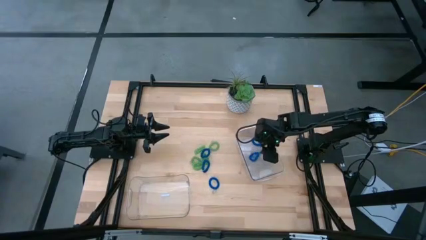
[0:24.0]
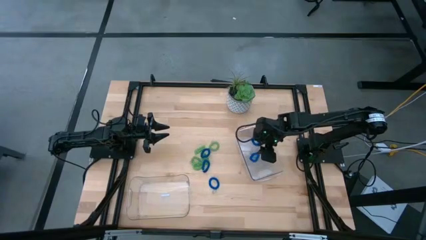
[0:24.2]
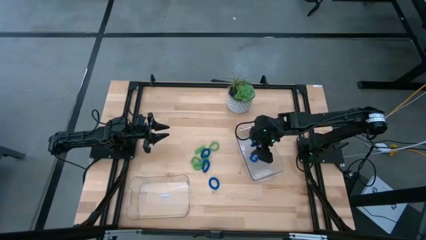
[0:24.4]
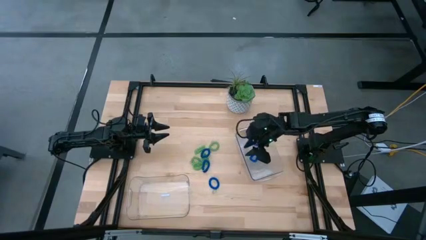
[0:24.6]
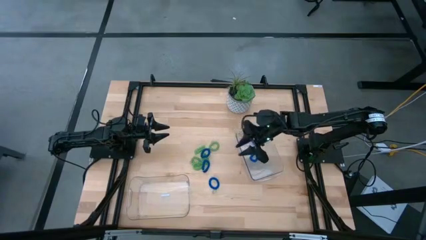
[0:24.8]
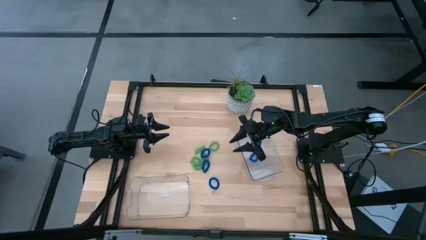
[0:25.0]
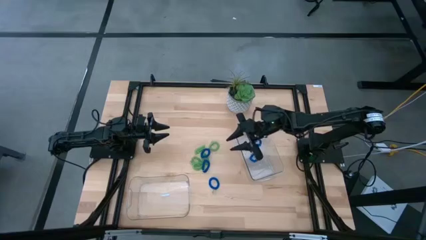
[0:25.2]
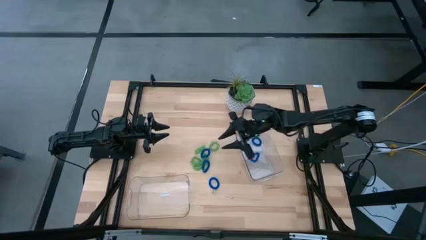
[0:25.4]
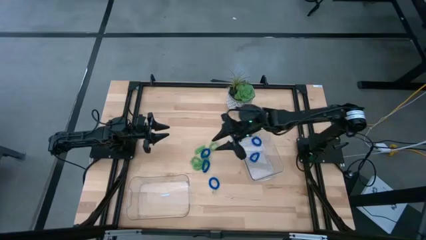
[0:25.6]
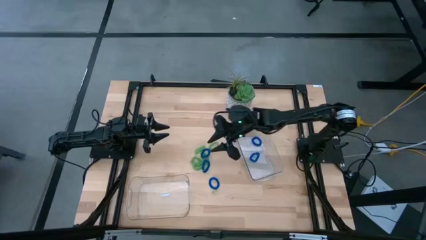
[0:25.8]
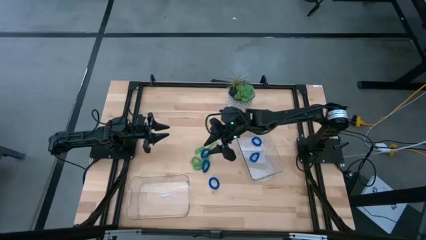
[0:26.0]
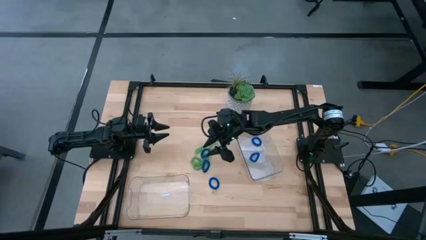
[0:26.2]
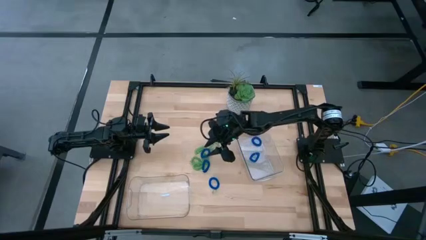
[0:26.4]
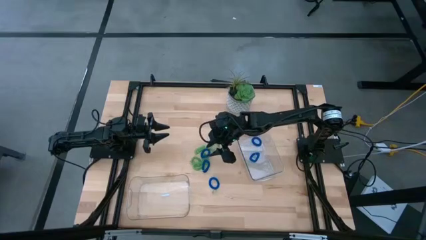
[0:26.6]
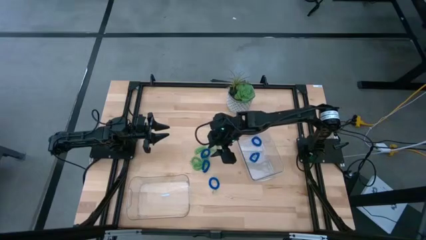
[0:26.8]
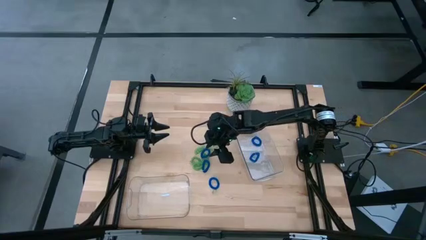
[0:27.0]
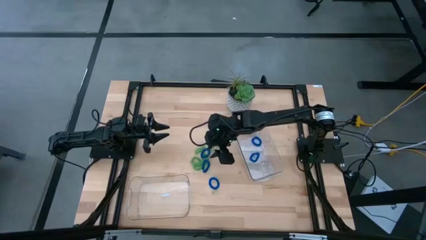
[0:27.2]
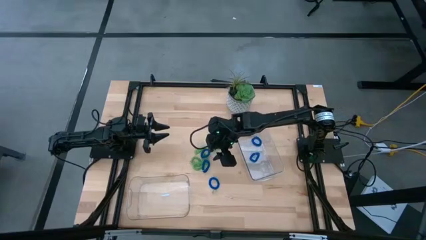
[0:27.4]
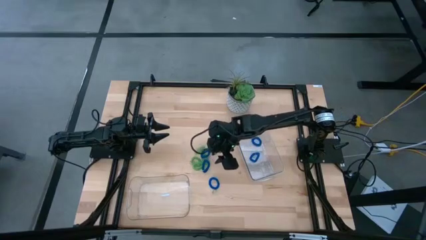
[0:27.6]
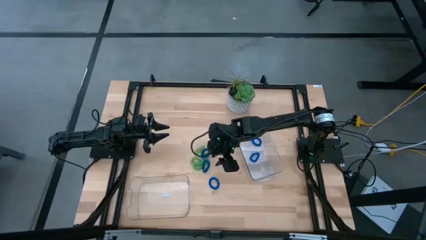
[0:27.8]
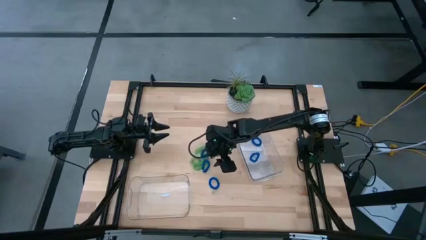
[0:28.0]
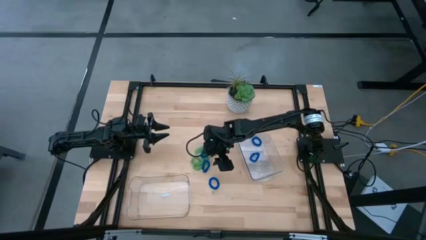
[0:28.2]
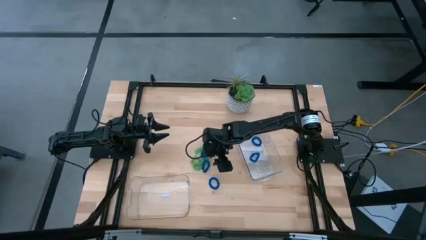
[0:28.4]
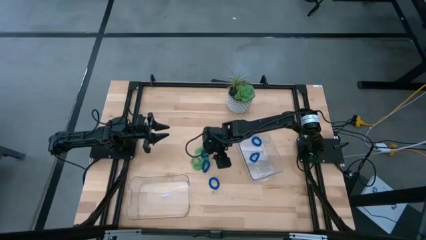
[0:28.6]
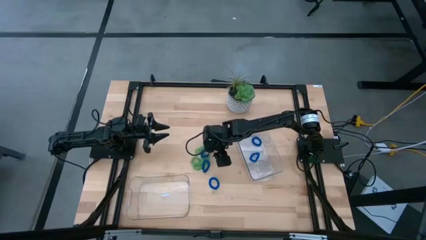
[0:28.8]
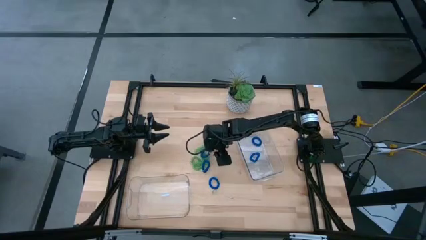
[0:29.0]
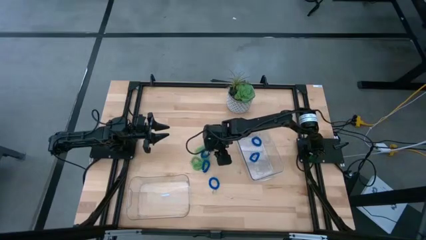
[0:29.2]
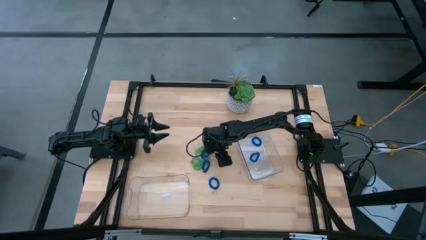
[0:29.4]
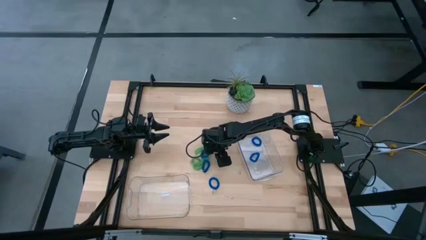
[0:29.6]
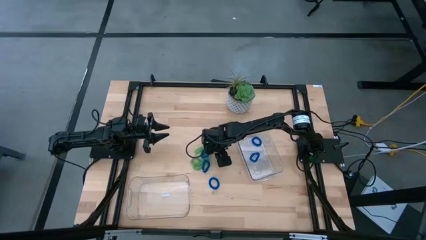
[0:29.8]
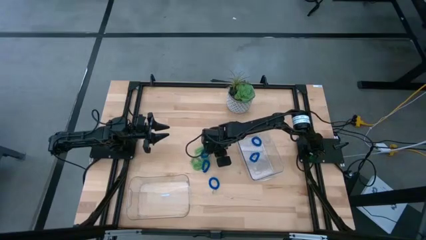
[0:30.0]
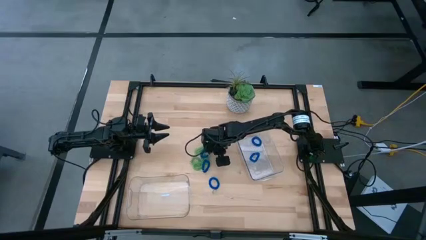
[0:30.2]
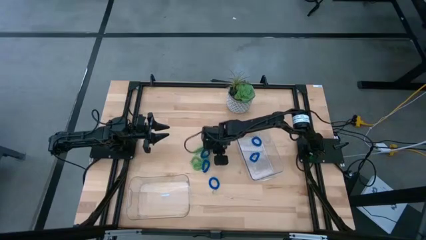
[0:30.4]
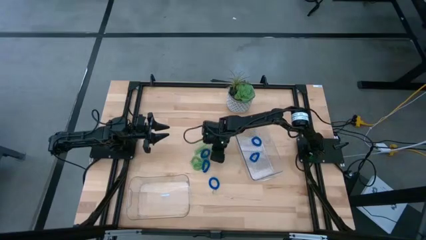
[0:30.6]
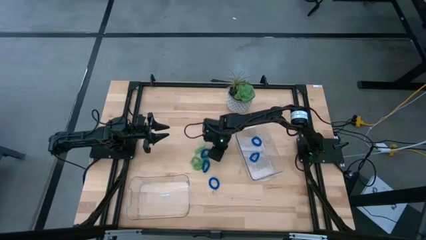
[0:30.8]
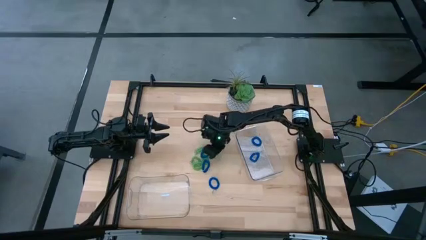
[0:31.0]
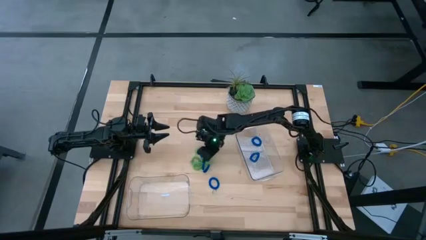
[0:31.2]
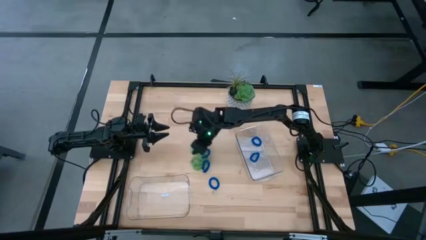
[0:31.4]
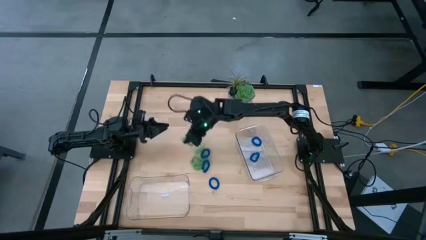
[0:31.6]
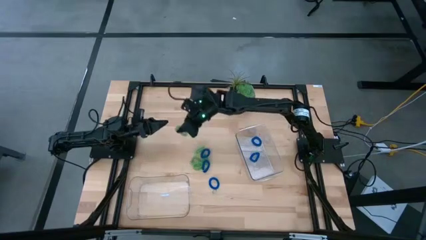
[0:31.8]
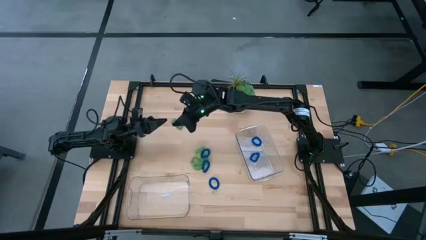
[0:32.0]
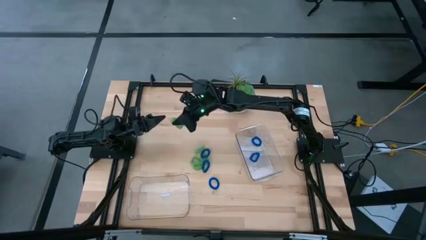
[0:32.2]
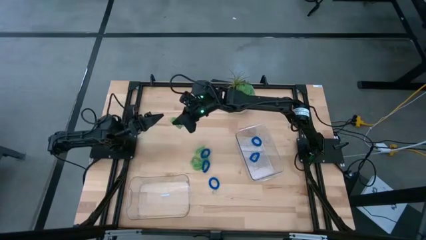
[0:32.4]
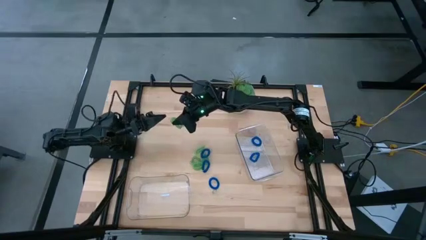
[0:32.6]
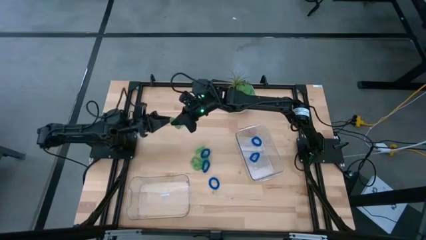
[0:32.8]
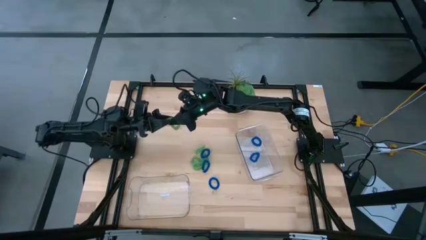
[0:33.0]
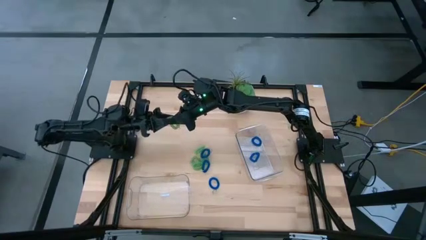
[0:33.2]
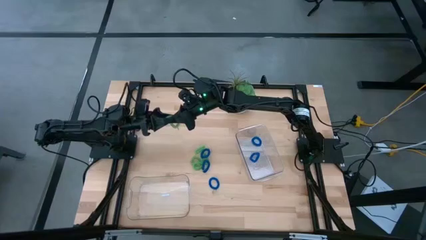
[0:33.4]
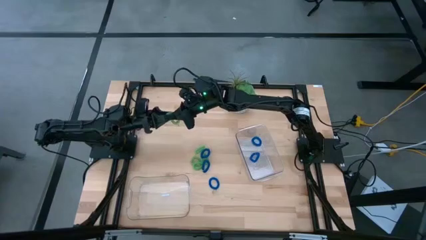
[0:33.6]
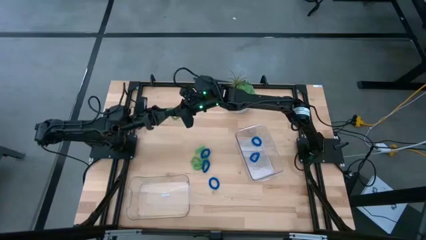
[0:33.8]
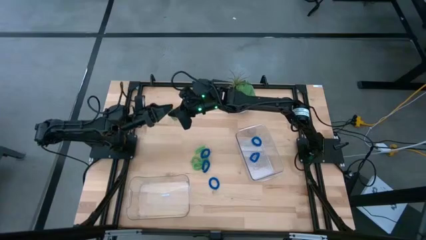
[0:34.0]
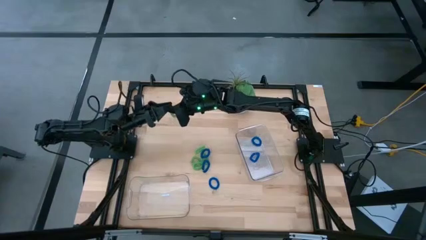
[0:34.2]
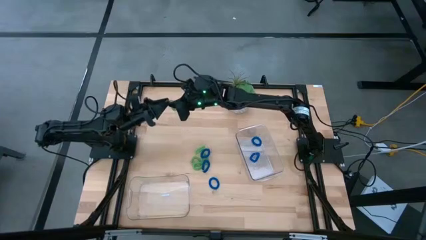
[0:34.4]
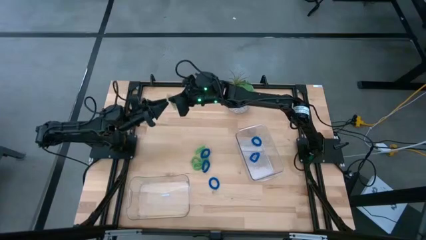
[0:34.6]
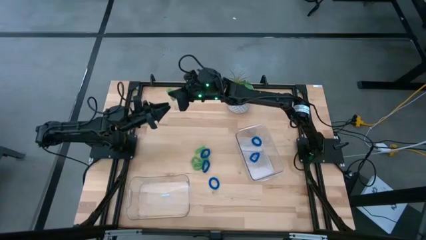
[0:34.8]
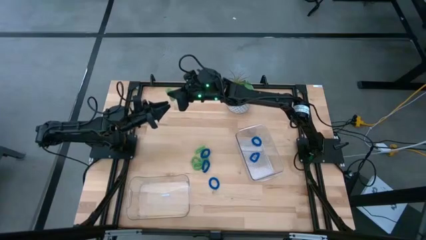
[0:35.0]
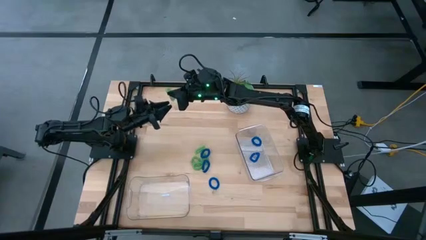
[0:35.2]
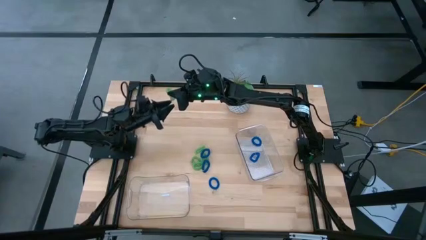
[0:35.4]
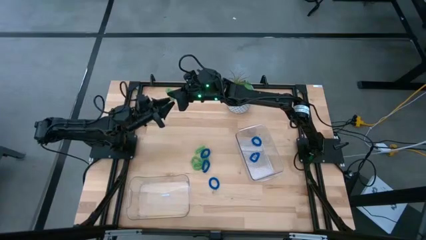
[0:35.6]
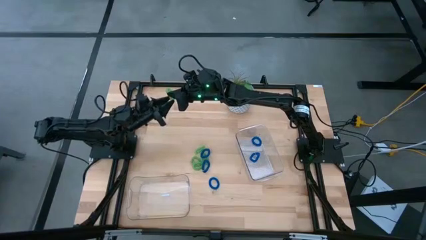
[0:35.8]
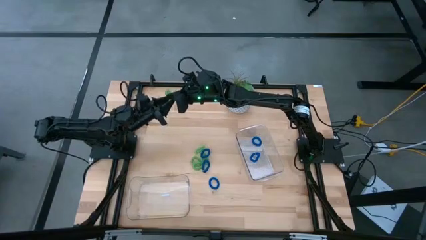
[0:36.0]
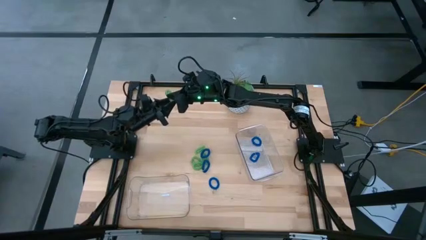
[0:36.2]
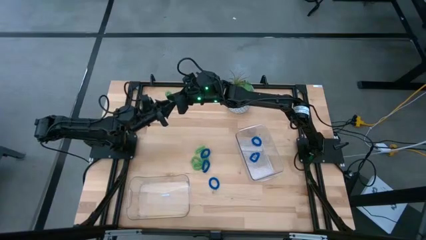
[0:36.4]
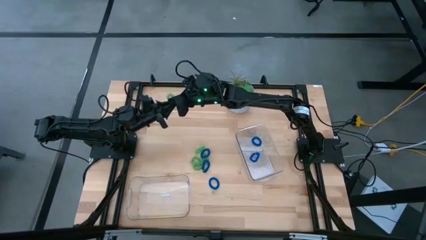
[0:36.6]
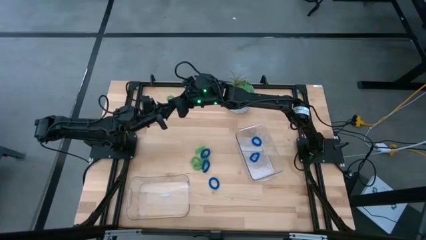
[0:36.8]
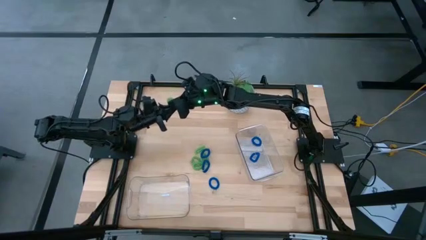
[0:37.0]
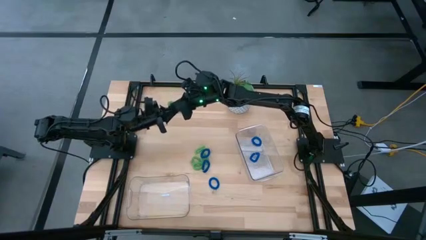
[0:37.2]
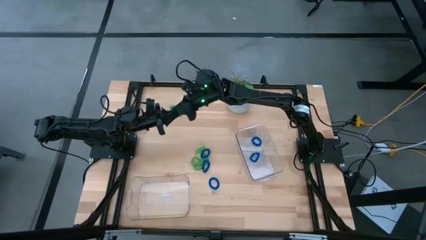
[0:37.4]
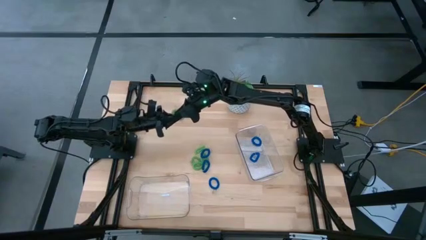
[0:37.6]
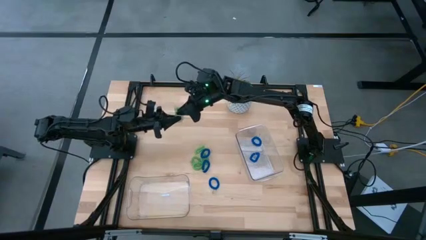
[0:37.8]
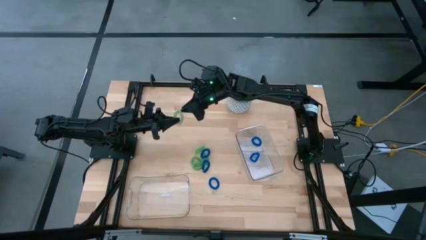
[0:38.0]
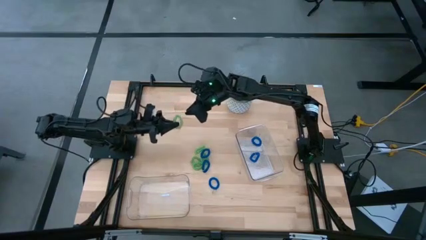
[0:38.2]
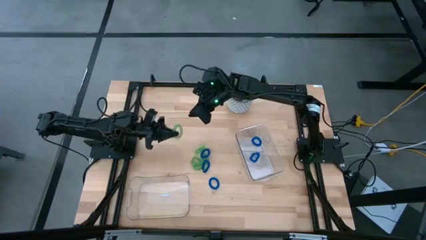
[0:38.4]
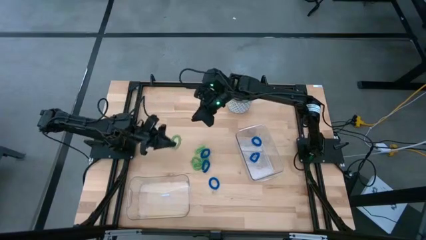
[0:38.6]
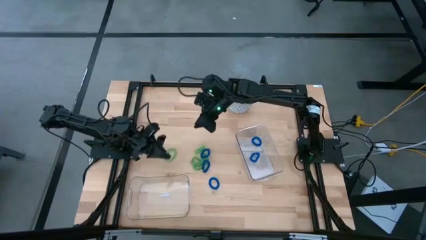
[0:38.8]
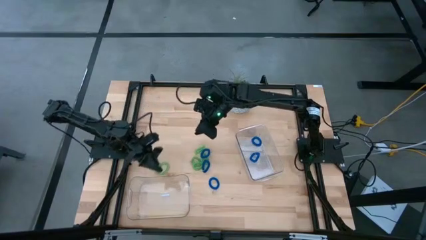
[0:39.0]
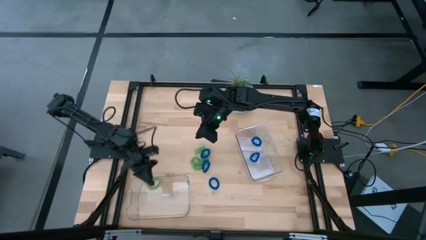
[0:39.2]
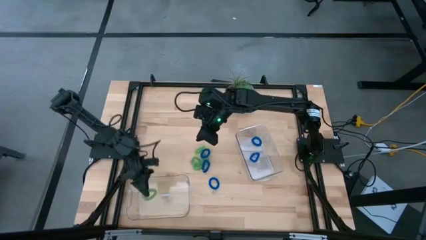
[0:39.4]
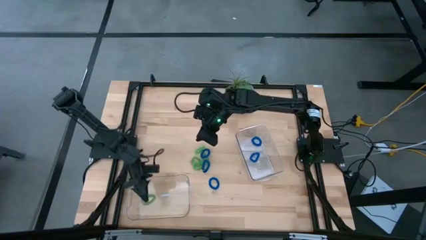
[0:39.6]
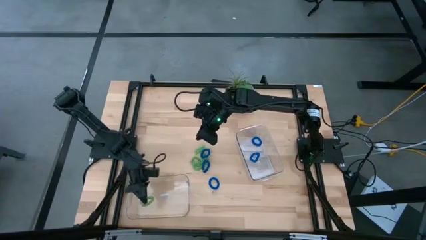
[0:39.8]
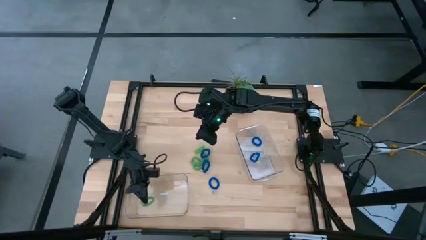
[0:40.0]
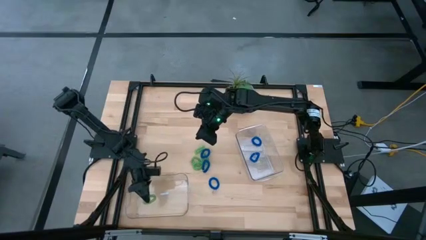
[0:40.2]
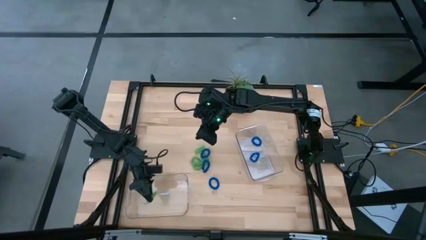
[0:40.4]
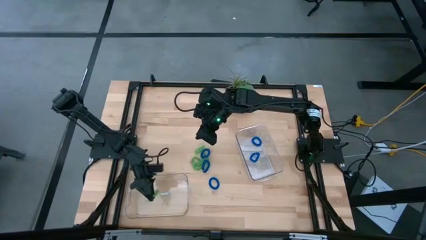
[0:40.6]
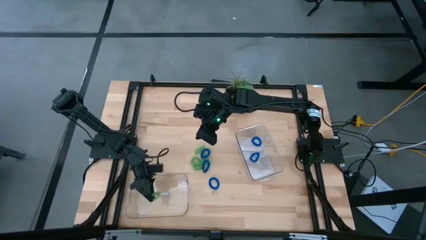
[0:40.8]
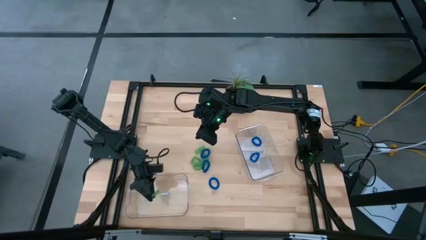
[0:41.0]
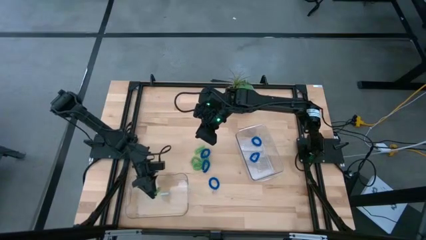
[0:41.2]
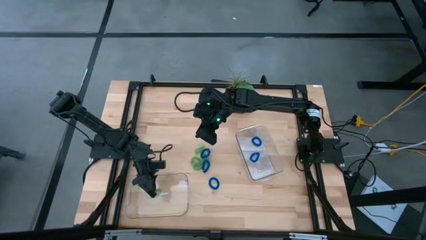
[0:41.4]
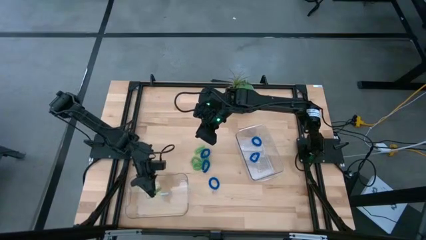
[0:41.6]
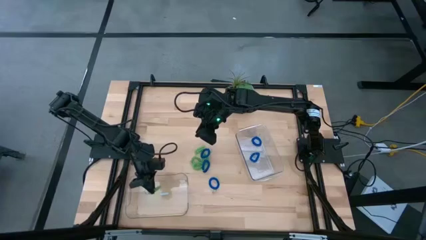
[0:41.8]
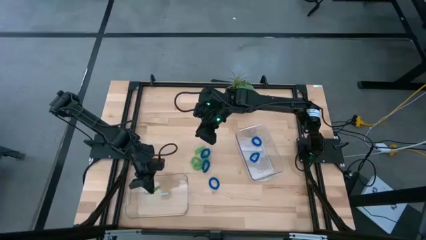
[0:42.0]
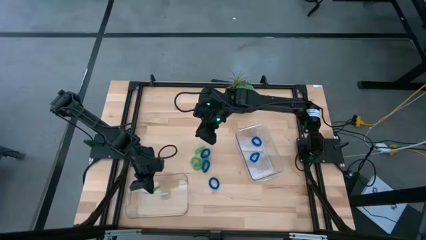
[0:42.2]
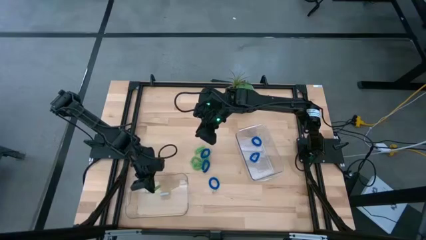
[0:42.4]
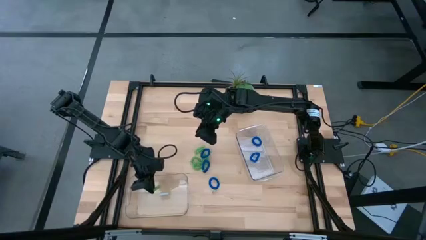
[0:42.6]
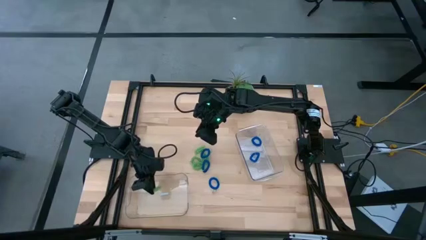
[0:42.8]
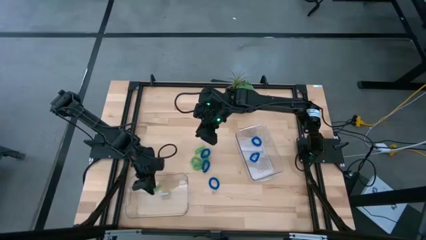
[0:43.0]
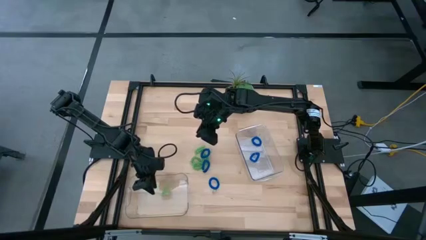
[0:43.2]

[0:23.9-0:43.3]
Task: Sort spring keychains
Put the green spring keychain into the left transparent bin
